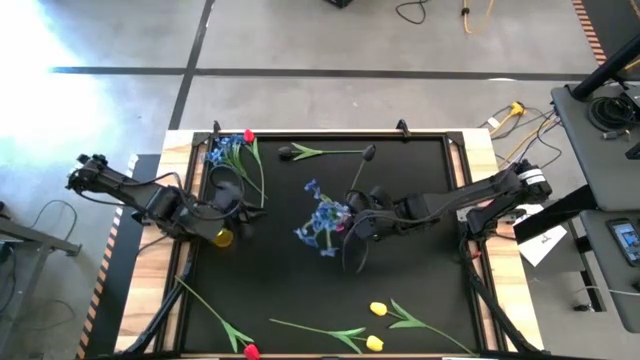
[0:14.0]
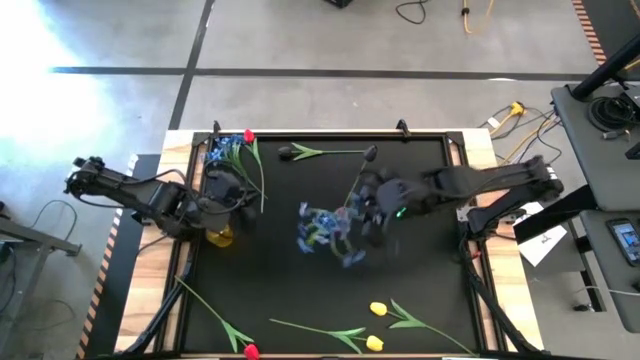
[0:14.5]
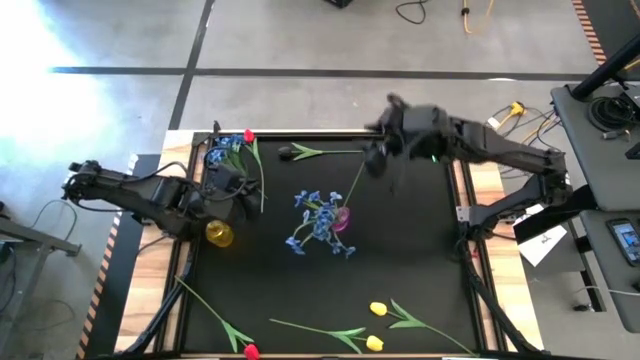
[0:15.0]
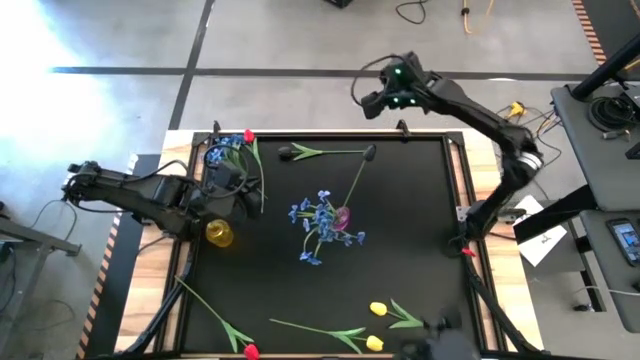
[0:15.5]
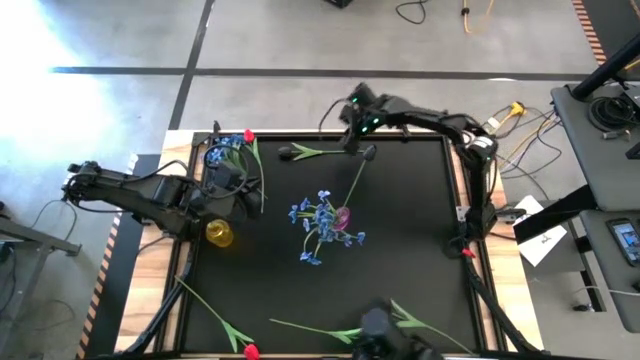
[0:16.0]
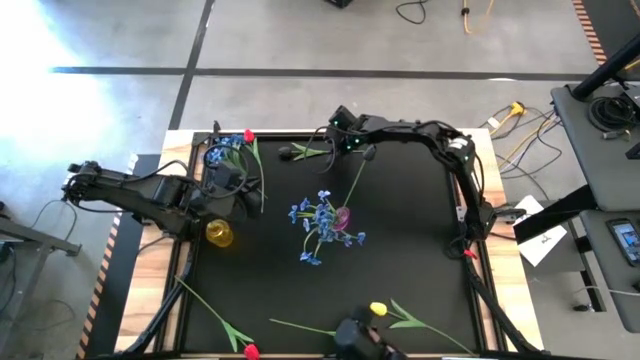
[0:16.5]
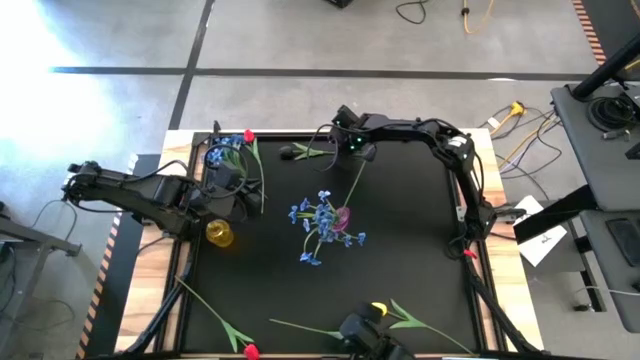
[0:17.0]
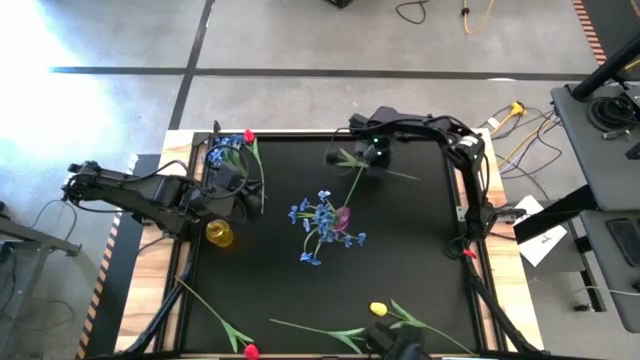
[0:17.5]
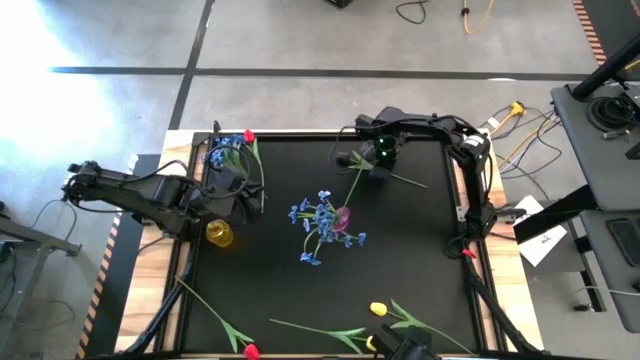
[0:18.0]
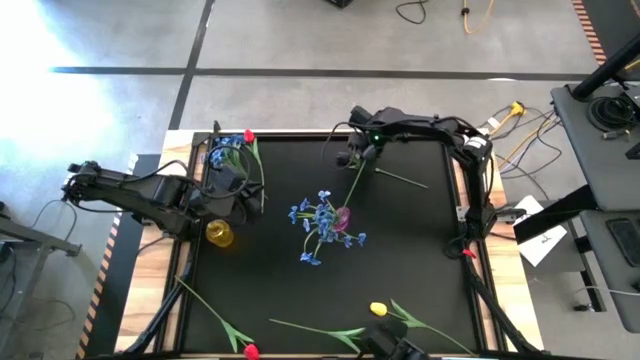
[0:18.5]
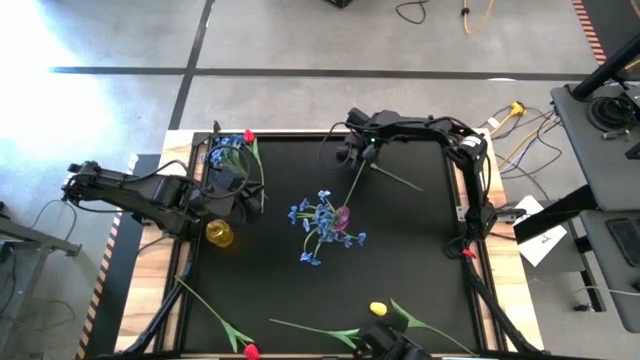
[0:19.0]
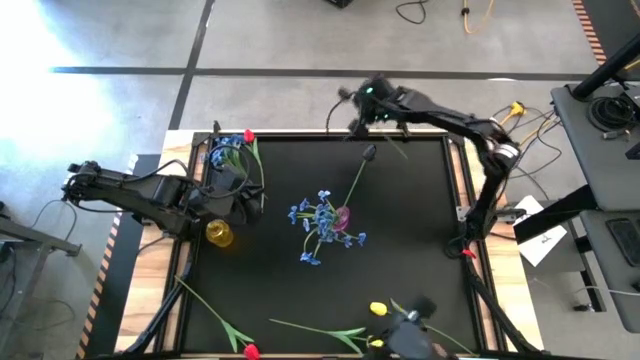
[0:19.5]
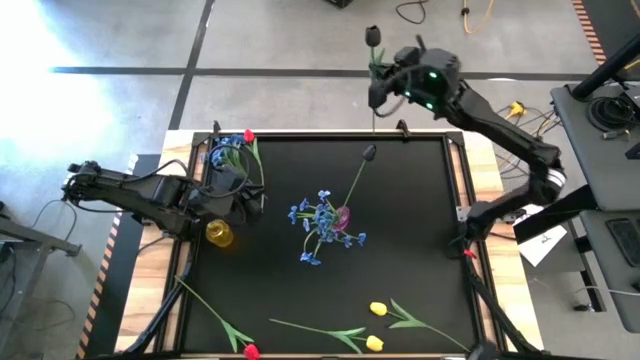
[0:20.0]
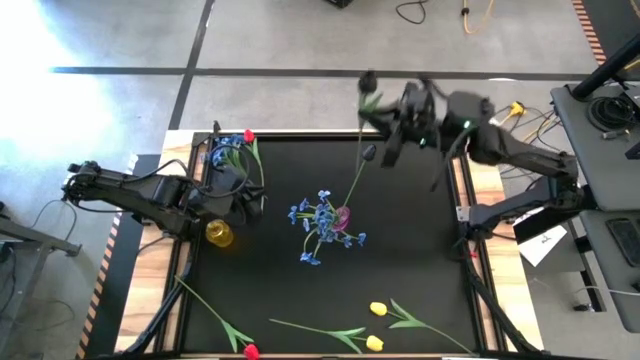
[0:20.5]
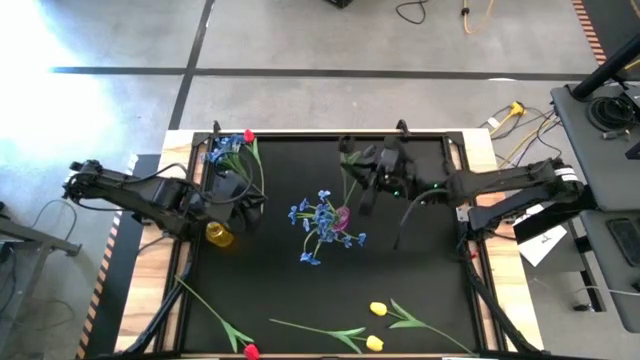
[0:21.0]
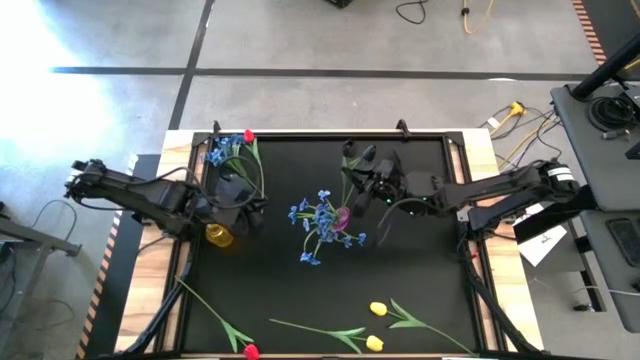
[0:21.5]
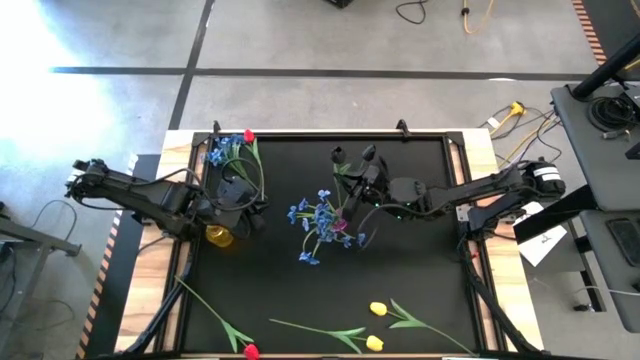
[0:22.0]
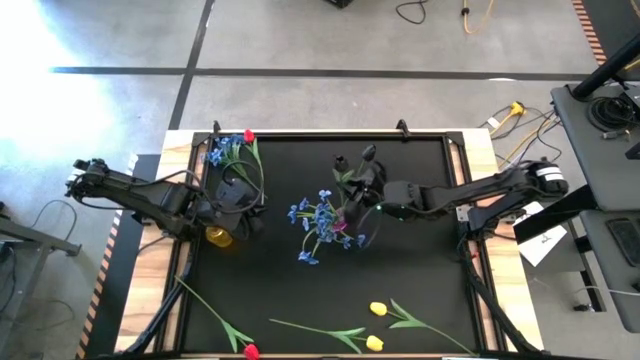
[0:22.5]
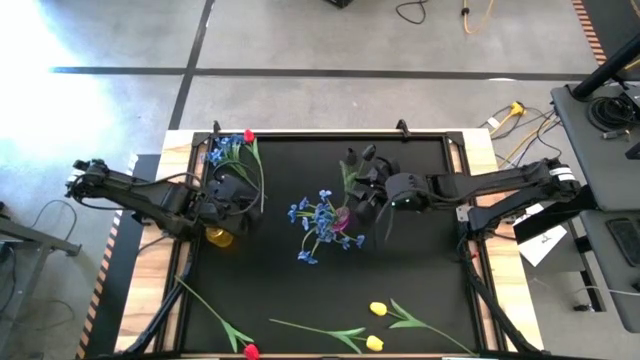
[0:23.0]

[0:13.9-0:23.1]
Task: Sort flowers into vase by color
Put the black flower into the pink vase

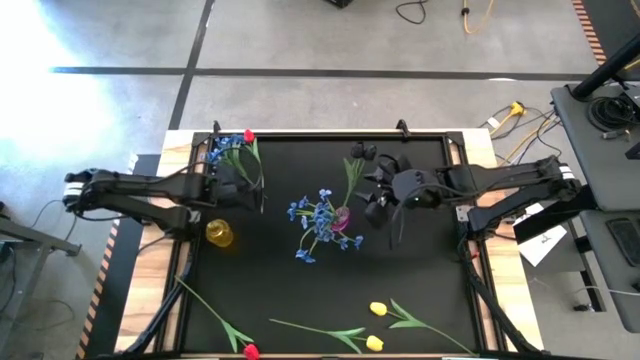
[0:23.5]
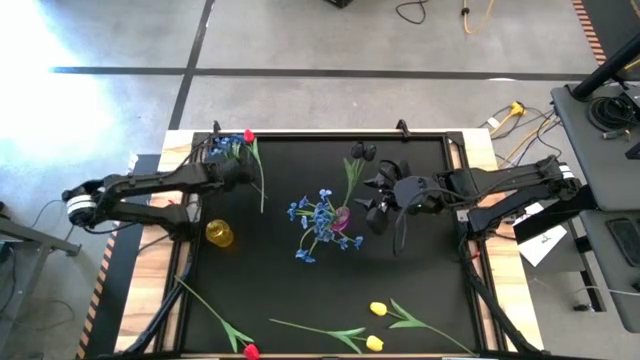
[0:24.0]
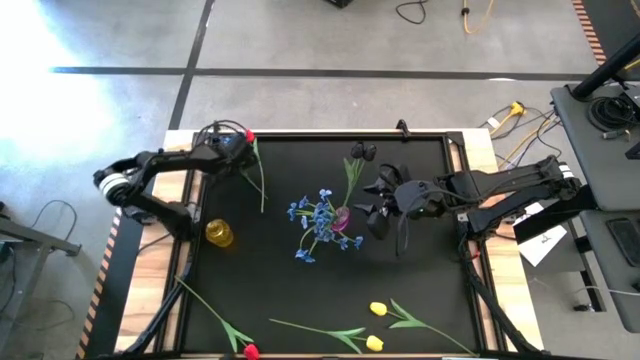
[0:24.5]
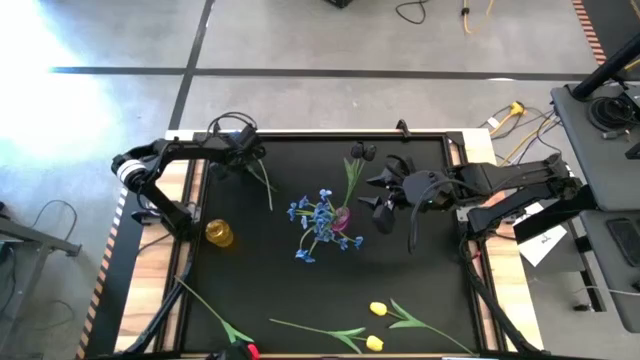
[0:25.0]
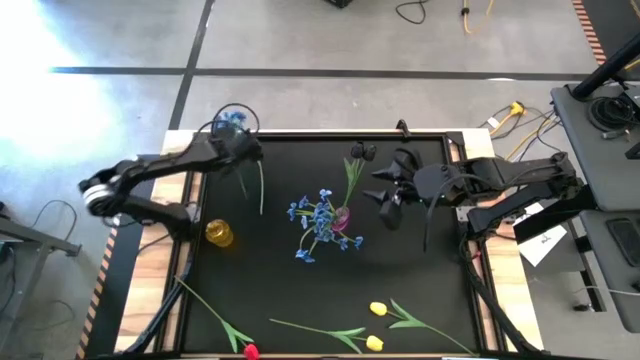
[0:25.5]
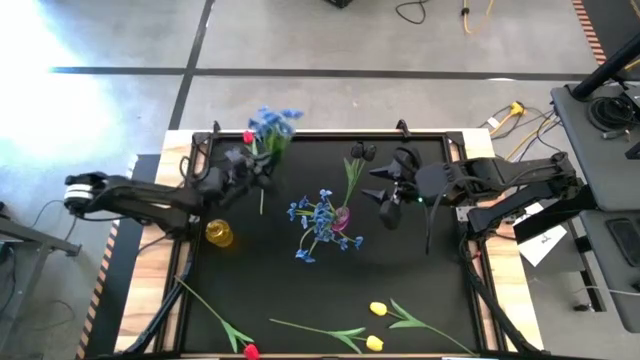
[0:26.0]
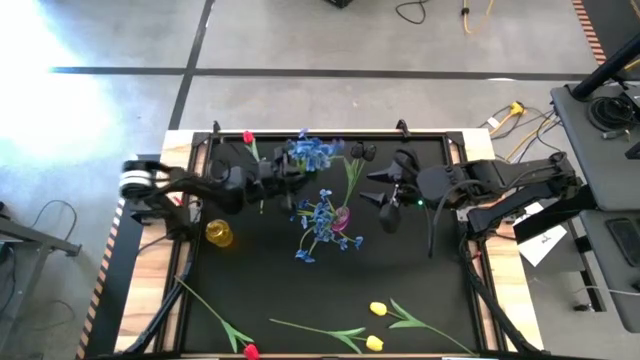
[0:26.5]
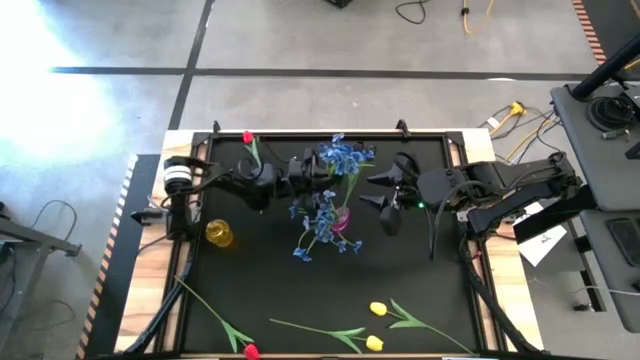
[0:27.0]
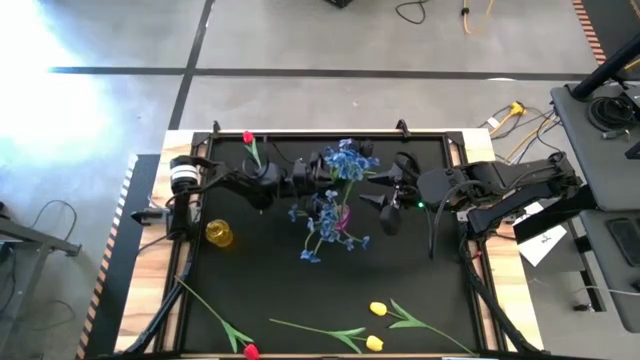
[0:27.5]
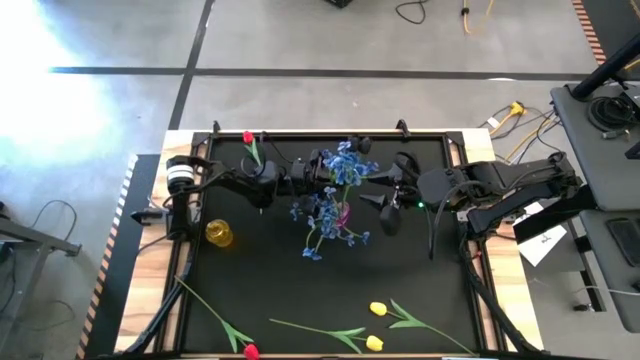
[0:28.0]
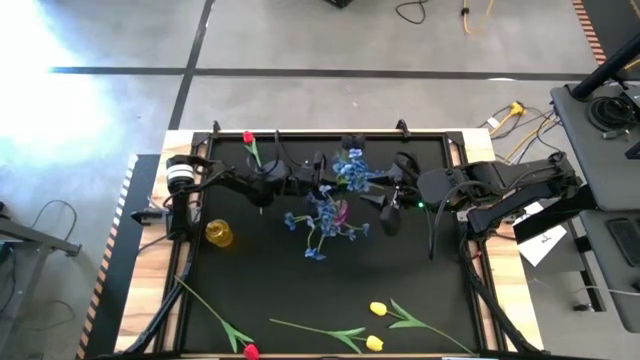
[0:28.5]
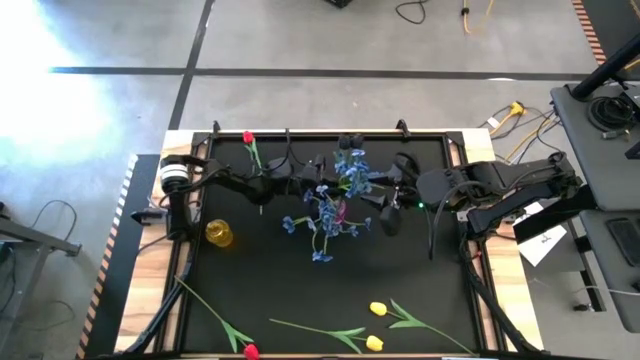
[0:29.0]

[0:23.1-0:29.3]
Put the blue flowers into the pink vase

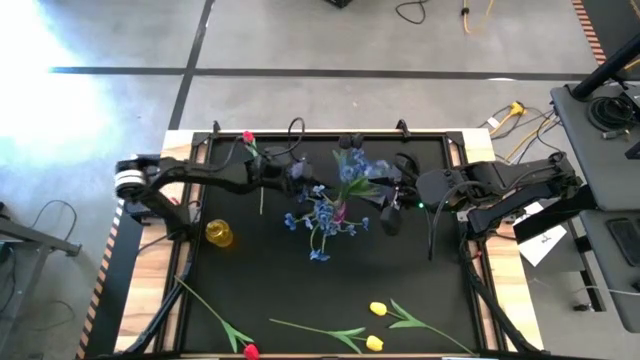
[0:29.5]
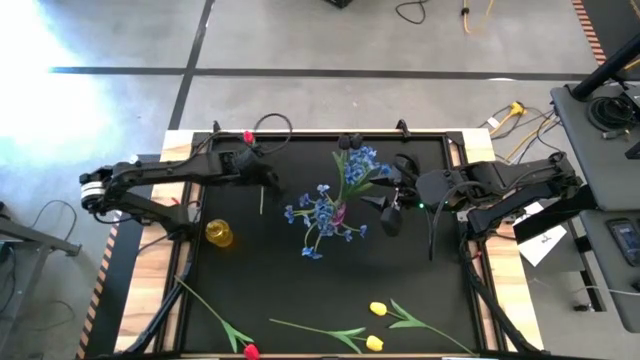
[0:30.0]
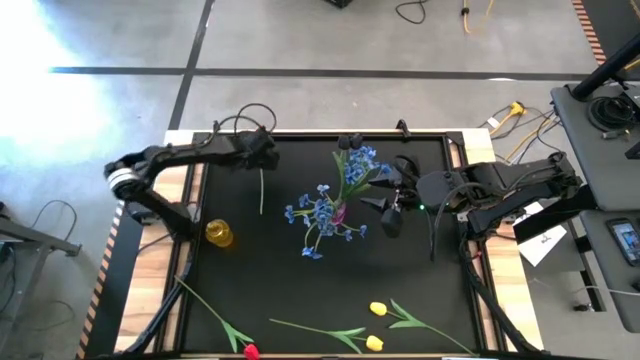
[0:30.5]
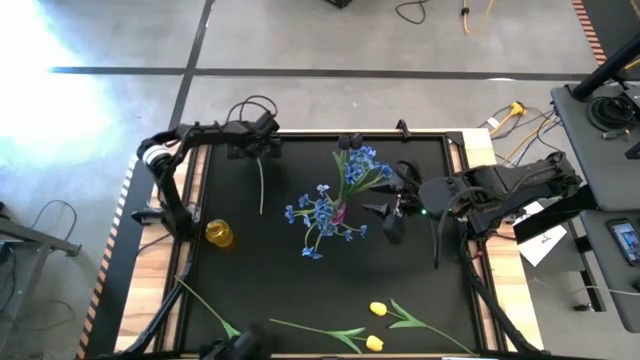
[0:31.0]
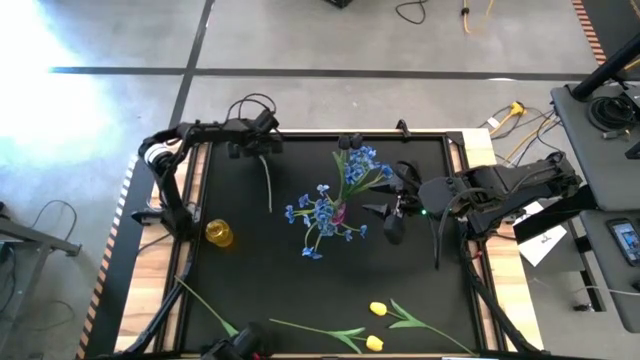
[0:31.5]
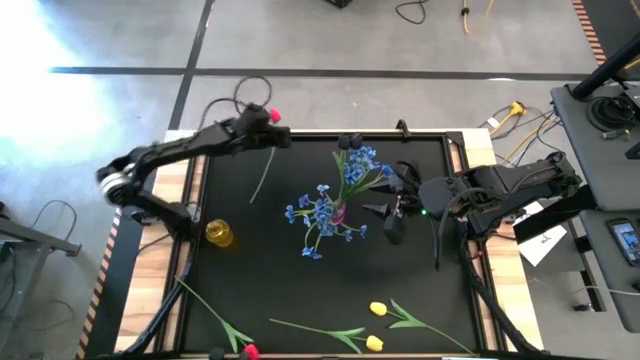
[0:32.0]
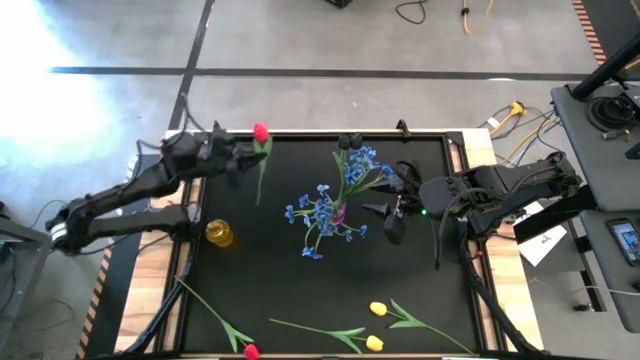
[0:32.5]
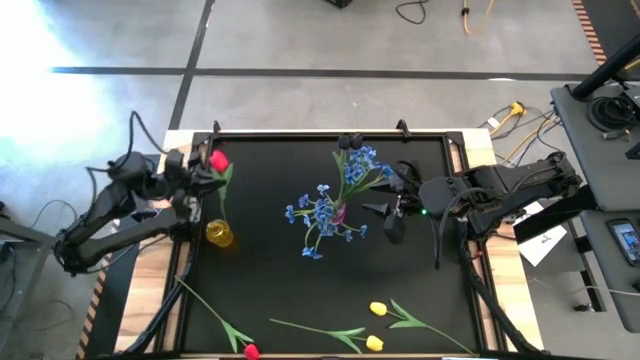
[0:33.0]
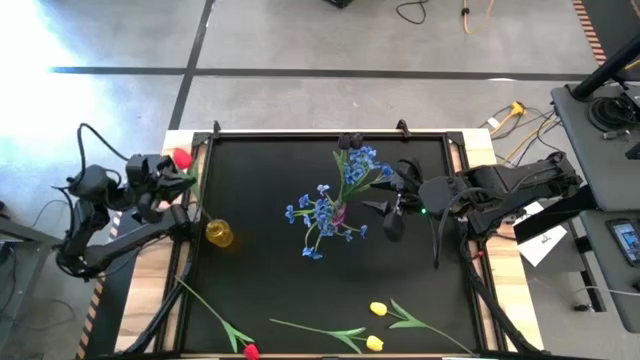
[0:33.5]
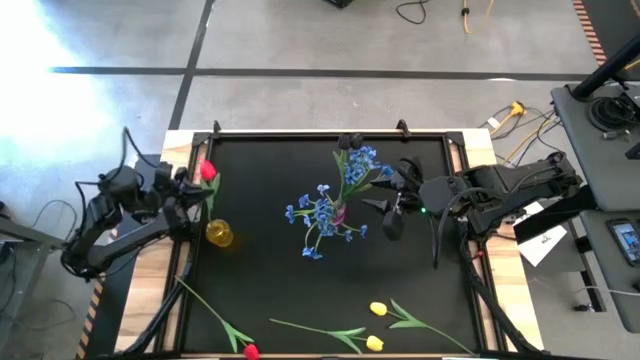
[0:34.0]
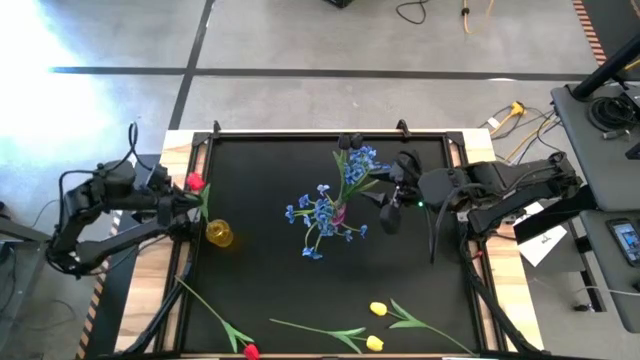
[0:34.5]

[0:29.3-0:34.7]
Put the top red flower into the yellow vase
